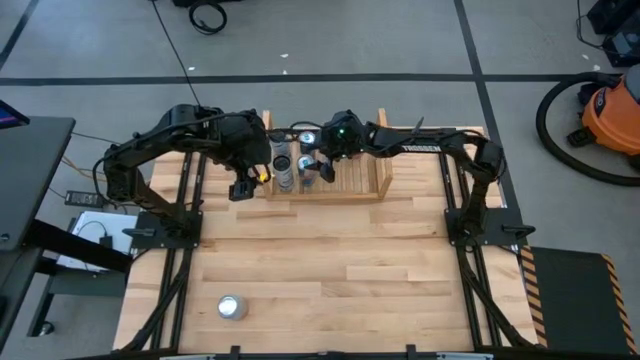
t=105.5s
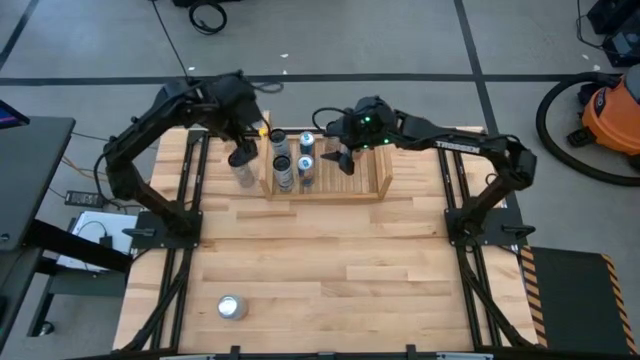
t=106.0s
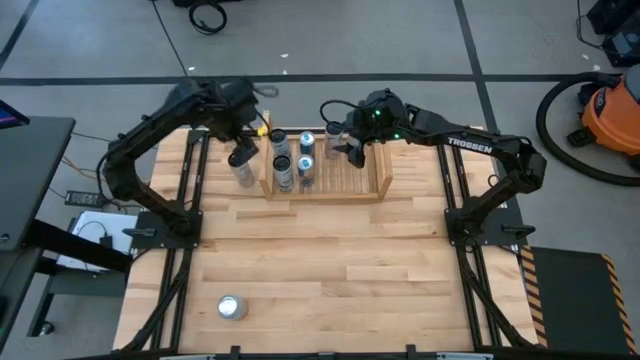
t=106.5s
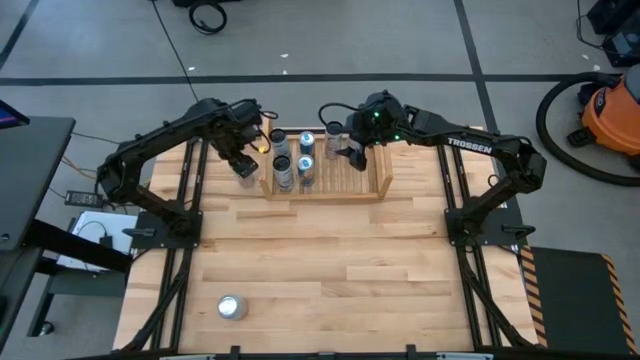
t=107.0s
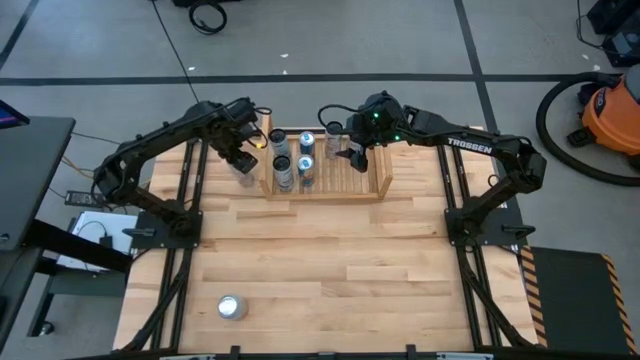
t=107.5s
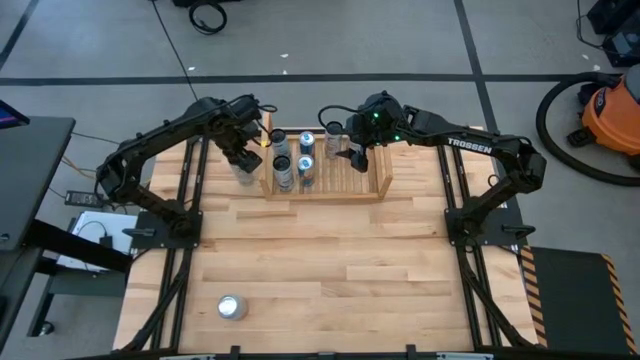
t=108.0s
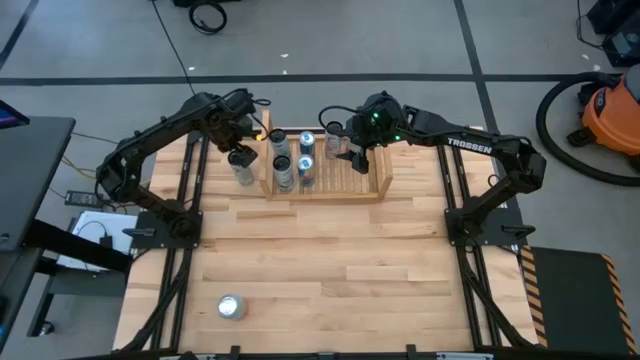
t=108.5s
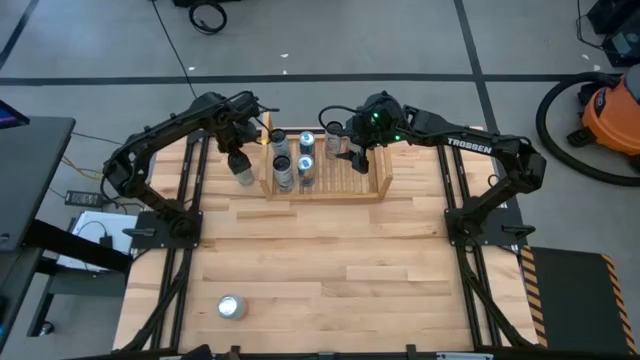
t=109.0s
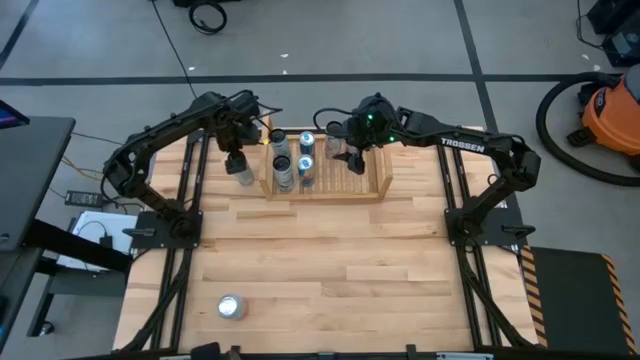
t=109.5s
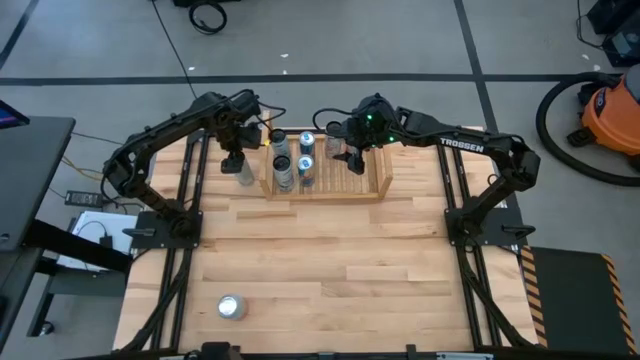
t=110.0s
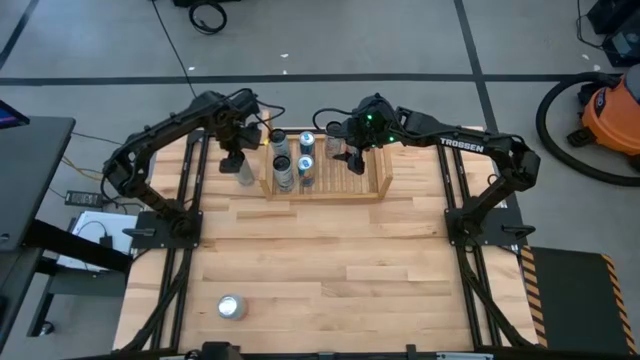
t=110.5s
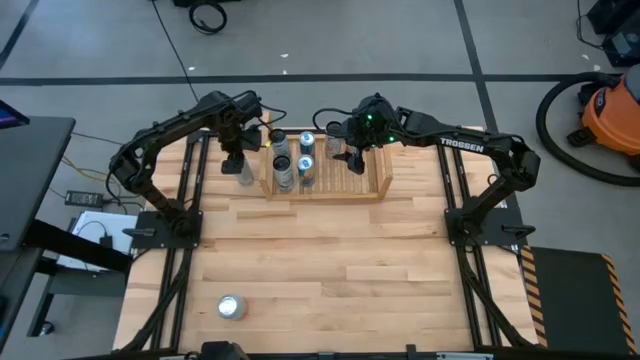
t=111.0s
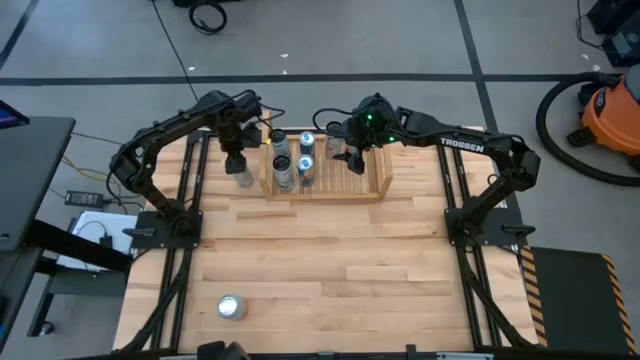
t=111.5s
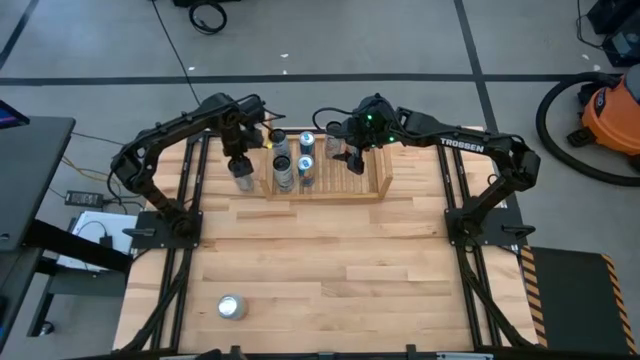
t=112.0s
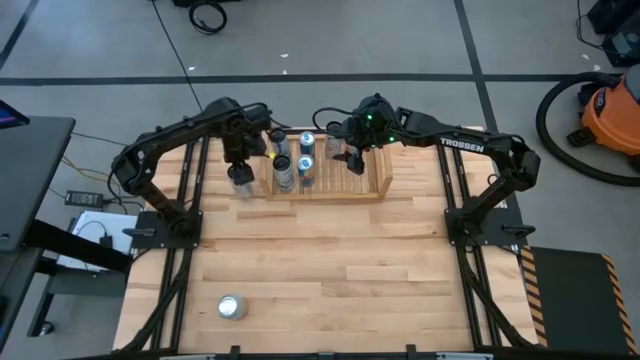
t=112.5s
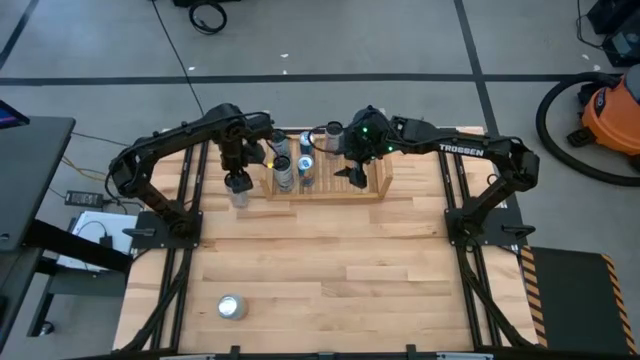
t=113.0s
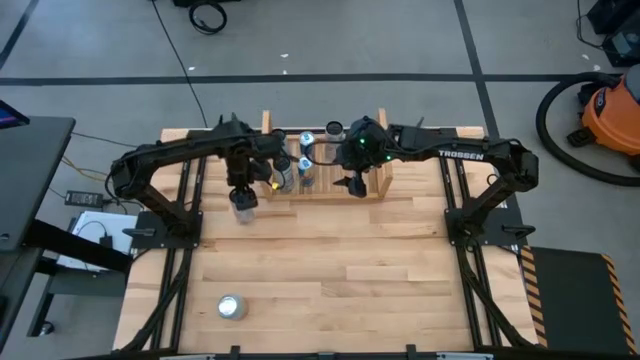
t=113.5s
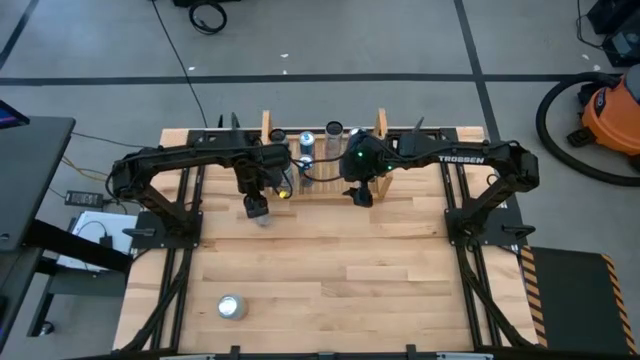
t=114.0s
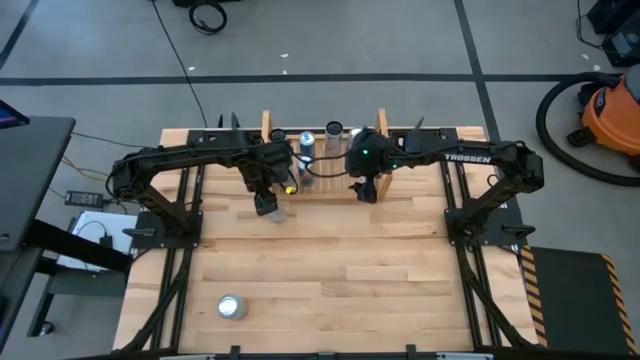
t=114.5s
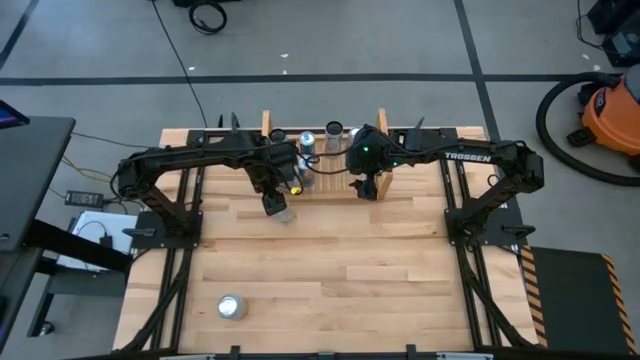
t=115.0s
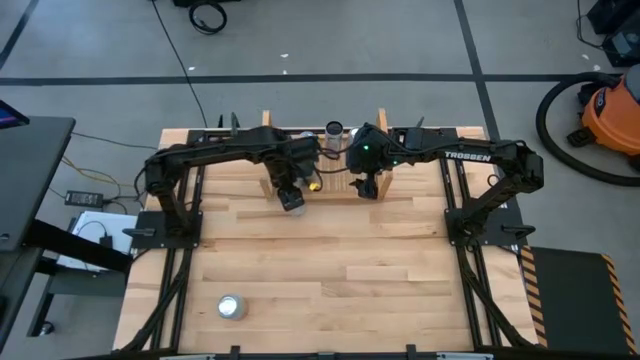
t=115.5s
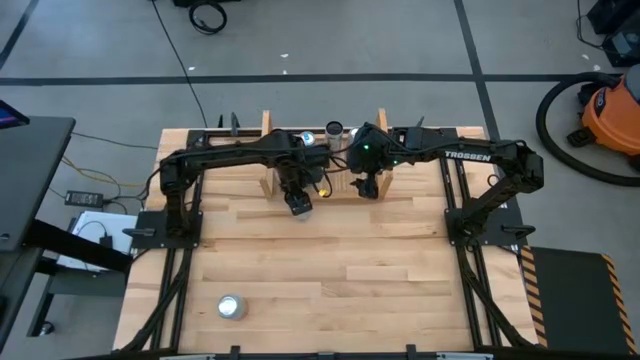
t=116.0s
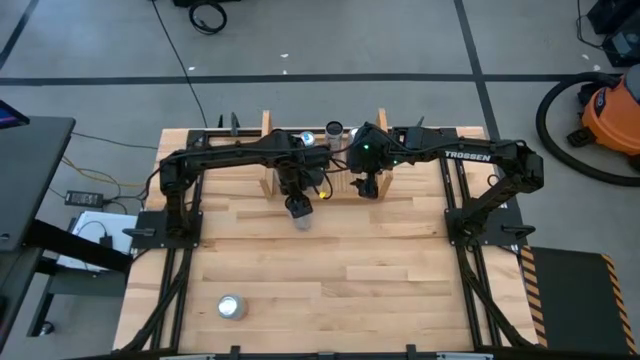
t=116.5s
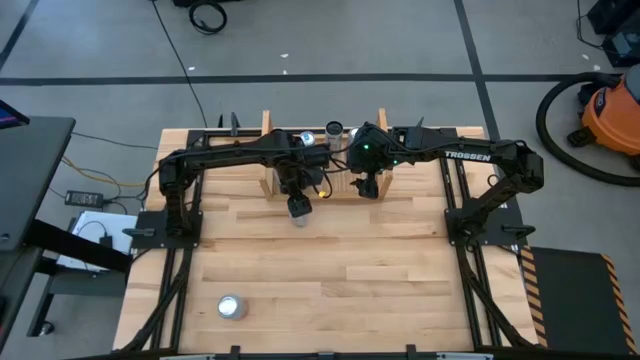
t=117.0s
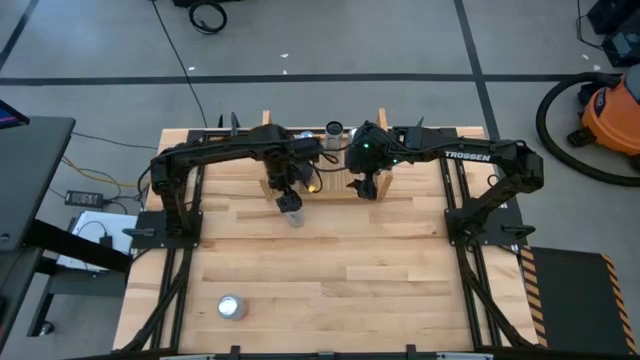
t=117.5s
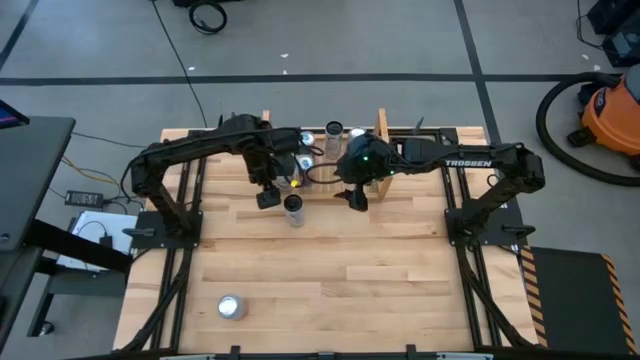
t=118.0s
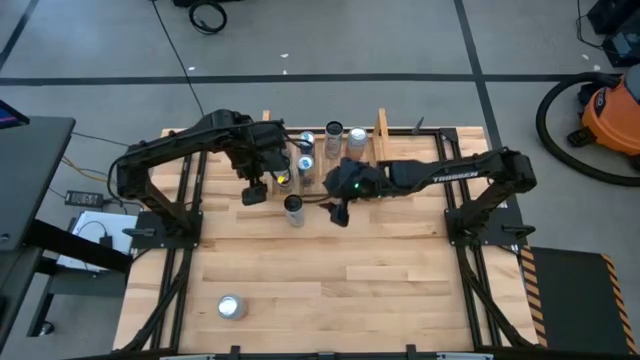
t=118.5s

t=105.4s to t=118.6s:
Task: Place canned beverage on shelf
Put the white-pink soda can on the shelf aligned with the other white-pink soda can

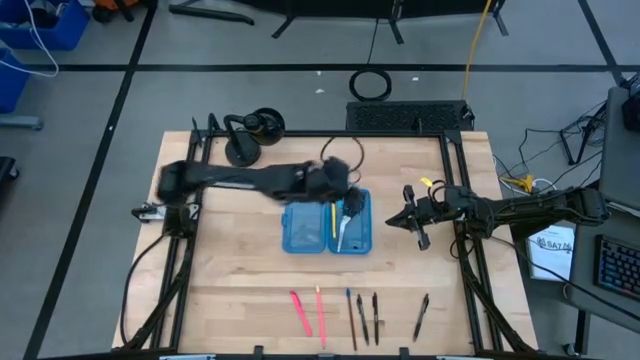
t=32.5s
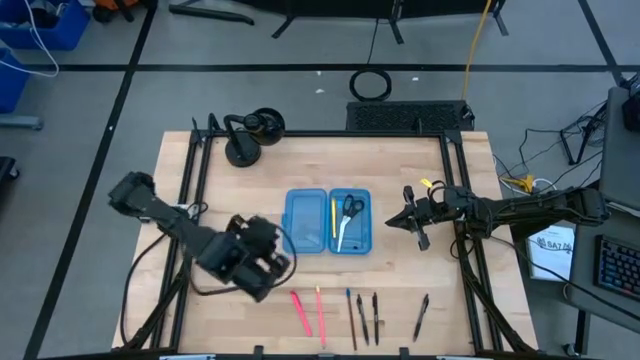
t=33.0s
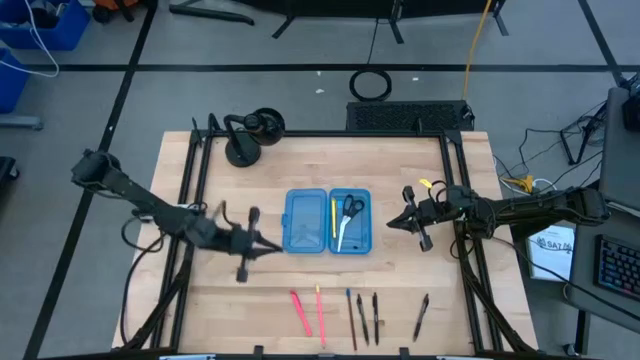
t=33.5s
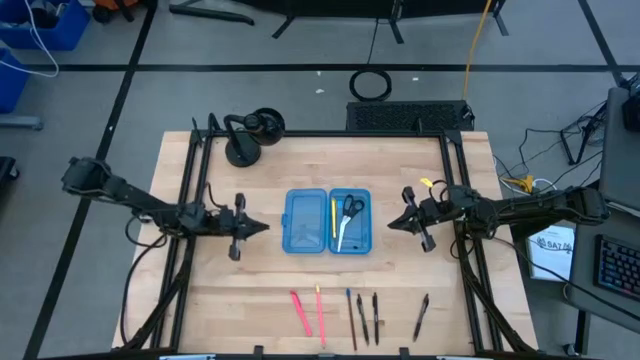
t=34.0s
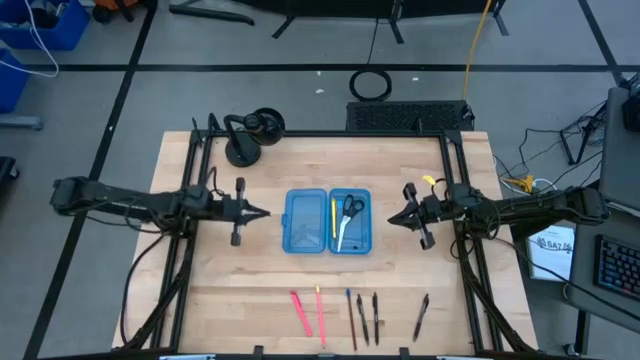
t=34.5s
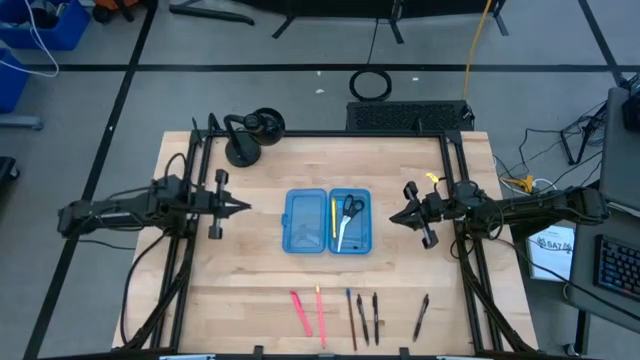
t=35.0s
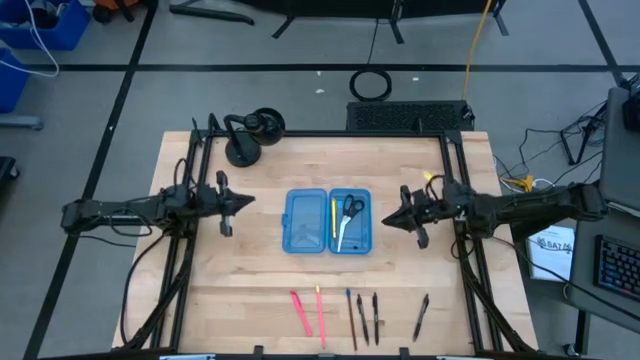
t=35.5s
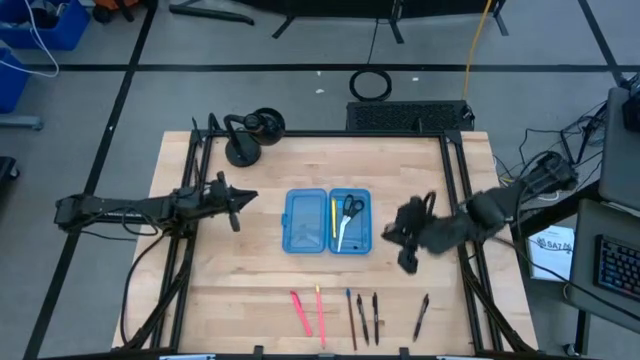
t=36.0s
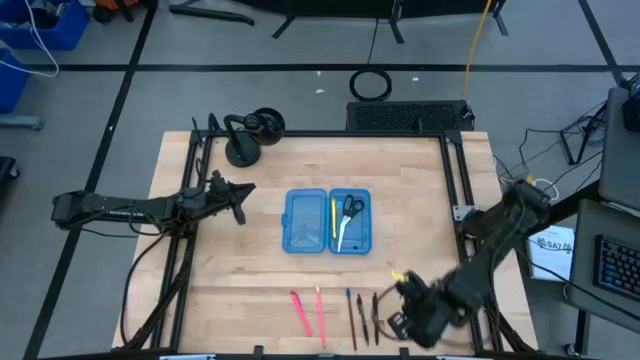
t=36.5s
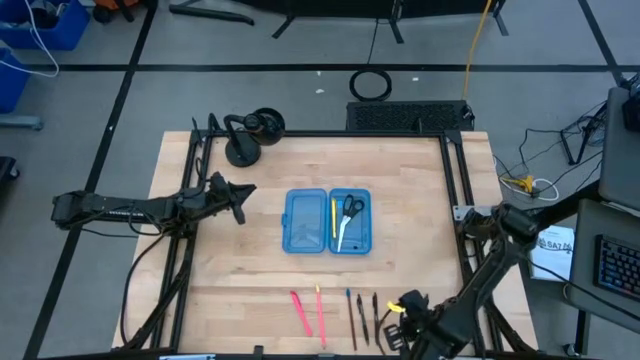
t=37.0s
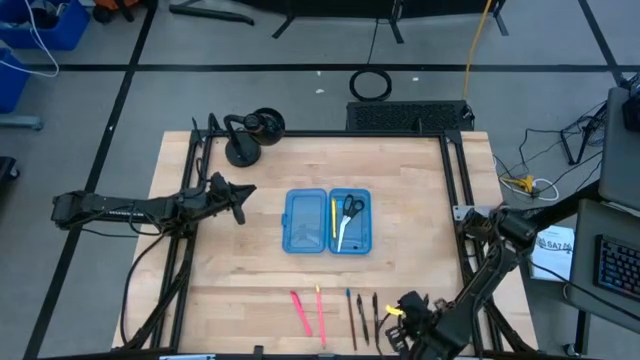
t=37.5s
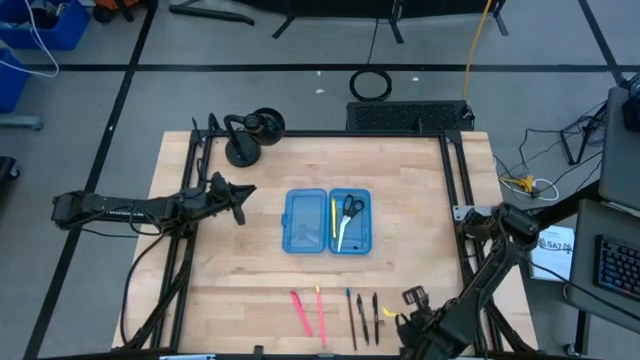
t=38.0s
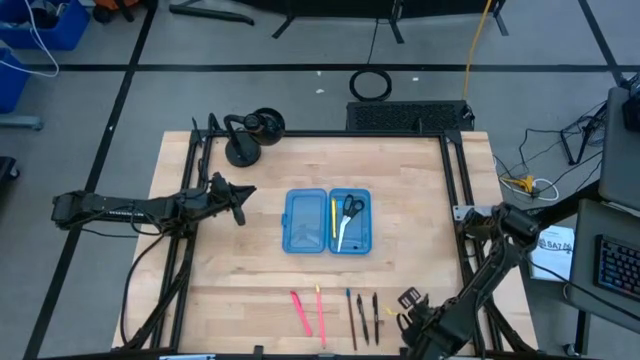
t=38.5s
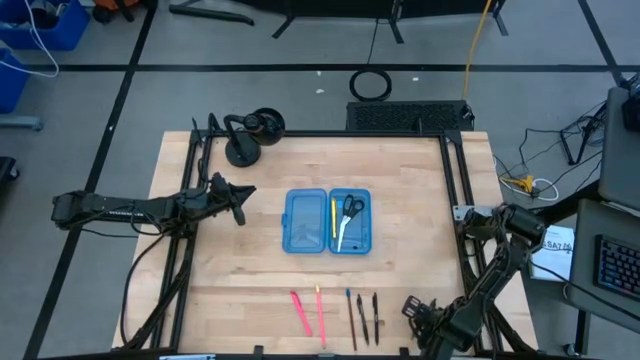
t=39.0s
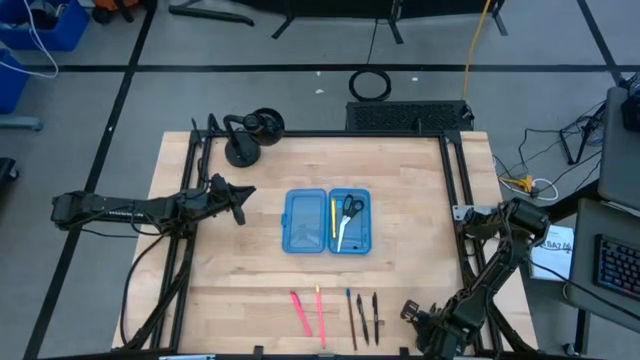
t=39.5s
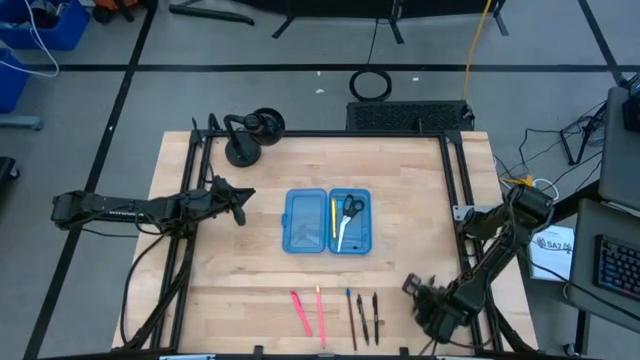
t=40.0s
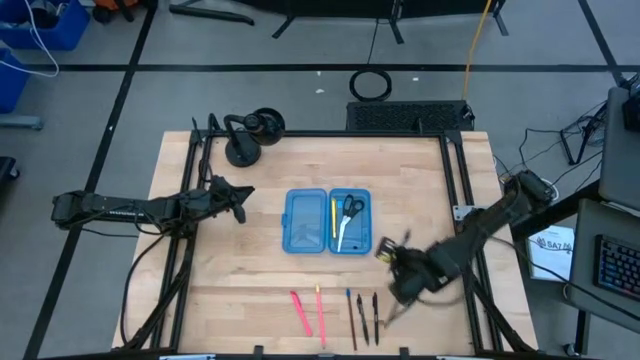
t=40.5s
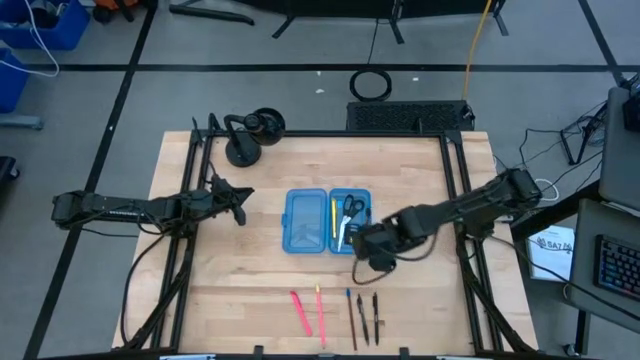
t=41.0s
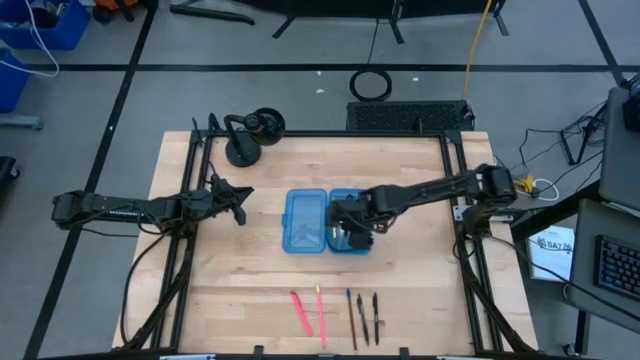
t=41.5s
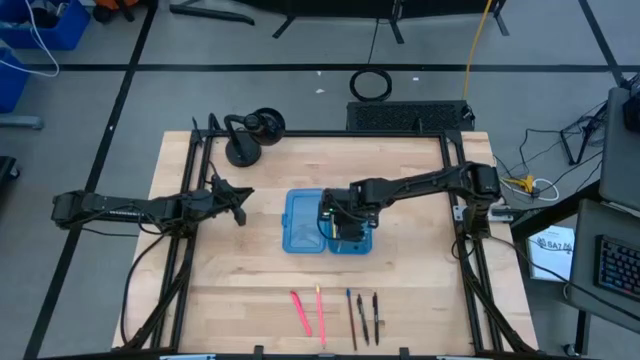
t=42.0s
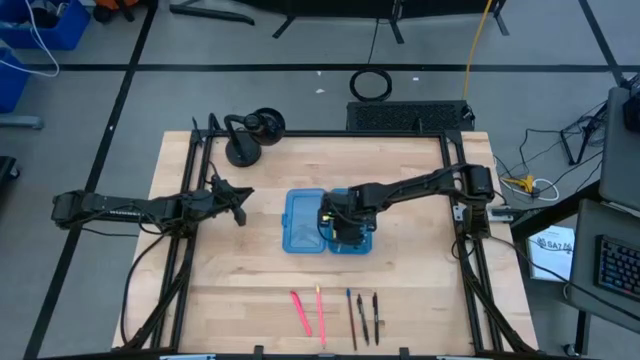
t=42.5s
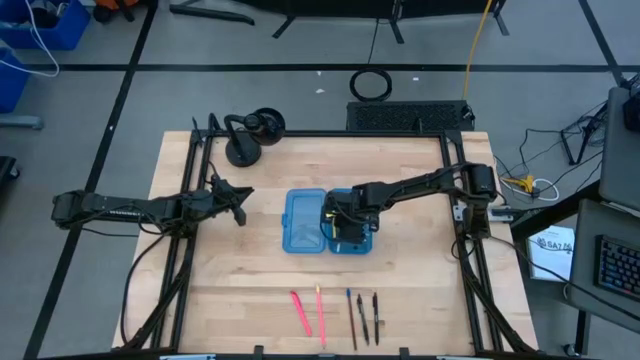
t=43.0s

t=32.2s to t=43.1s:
Task: Pick & place school supplies into a supply box
Put the right black pen into the blue supply box
